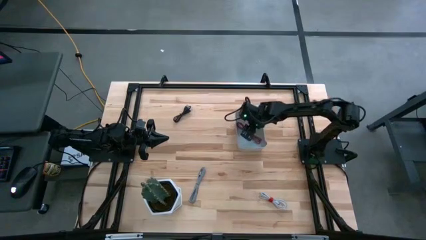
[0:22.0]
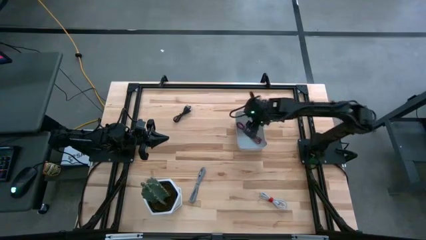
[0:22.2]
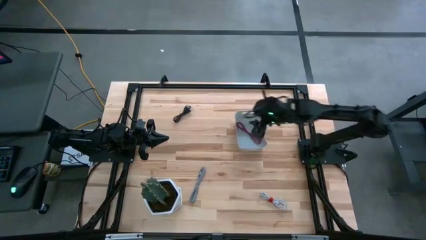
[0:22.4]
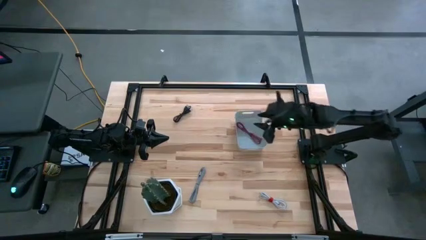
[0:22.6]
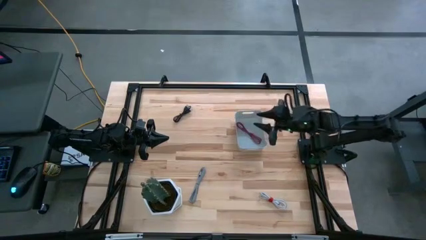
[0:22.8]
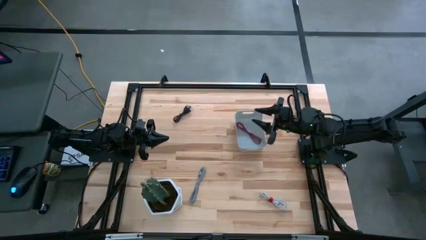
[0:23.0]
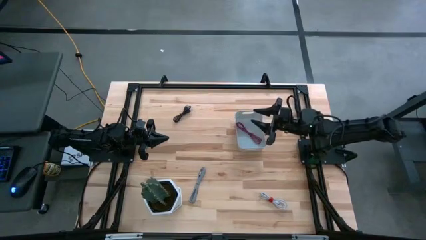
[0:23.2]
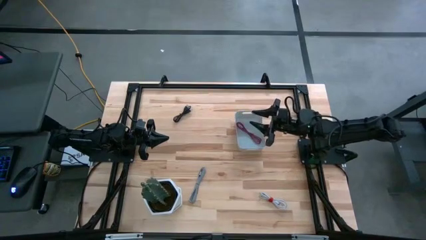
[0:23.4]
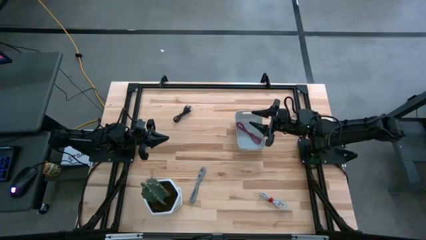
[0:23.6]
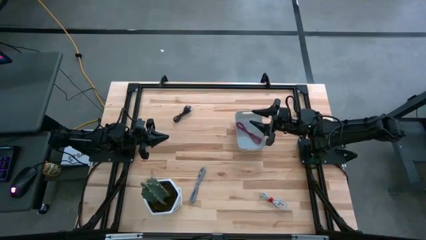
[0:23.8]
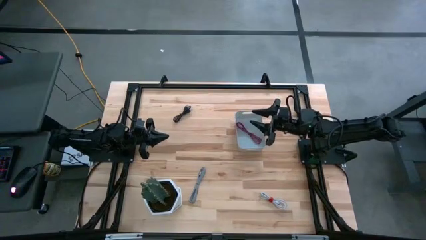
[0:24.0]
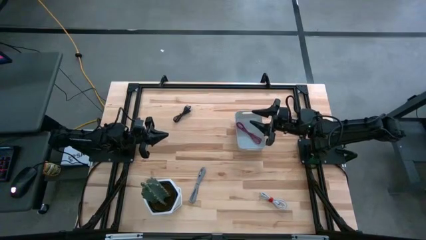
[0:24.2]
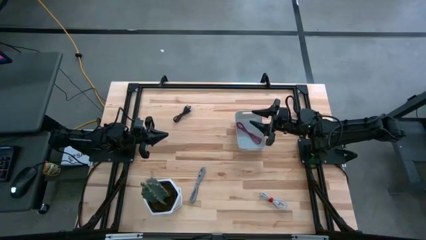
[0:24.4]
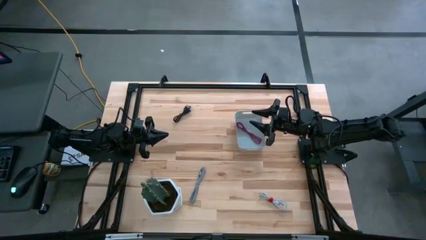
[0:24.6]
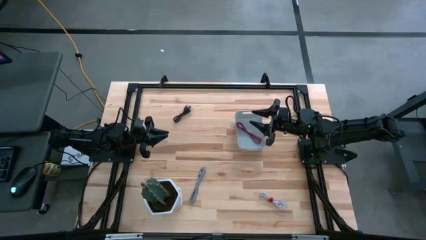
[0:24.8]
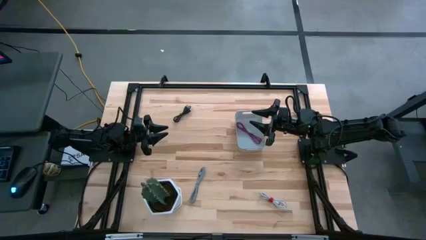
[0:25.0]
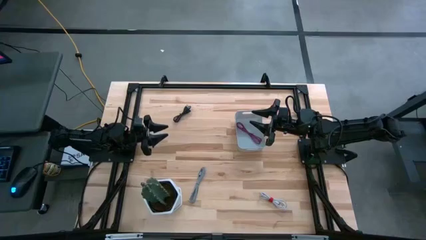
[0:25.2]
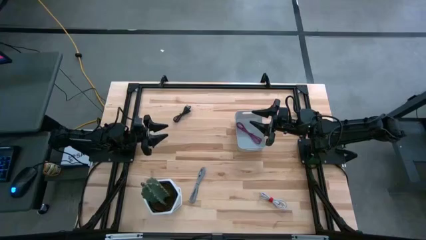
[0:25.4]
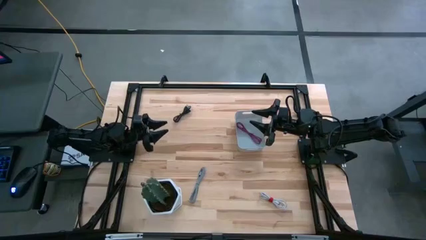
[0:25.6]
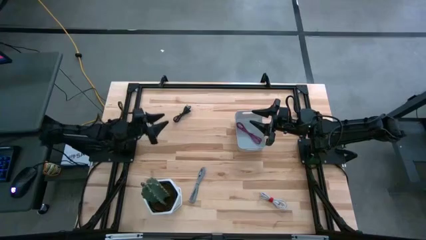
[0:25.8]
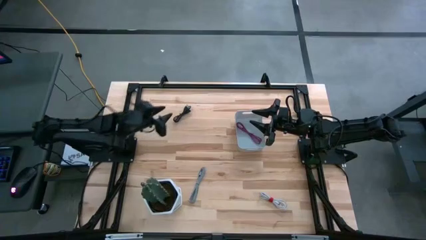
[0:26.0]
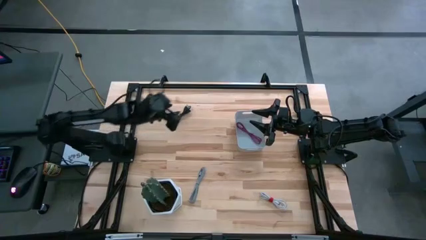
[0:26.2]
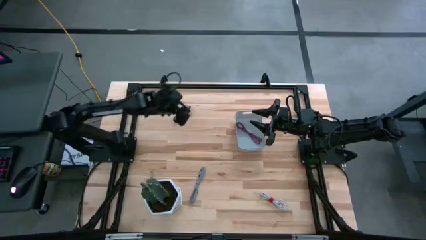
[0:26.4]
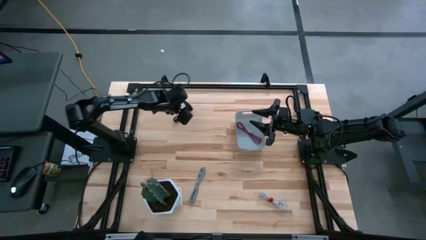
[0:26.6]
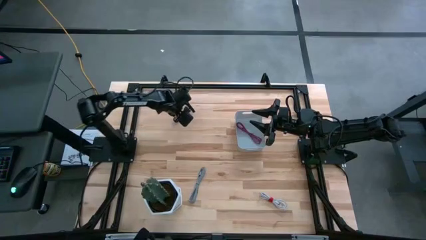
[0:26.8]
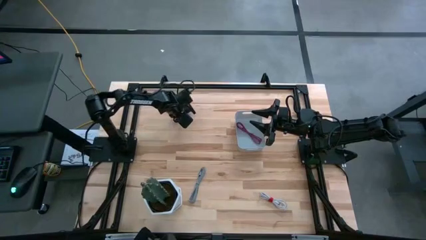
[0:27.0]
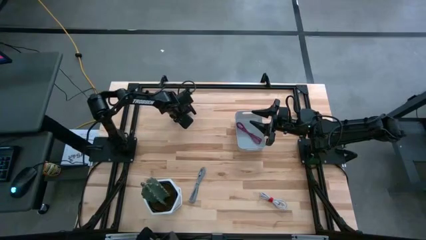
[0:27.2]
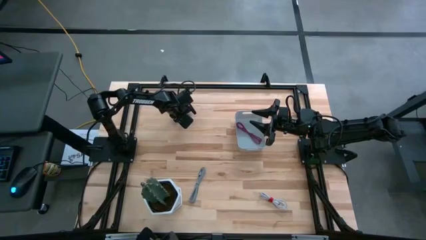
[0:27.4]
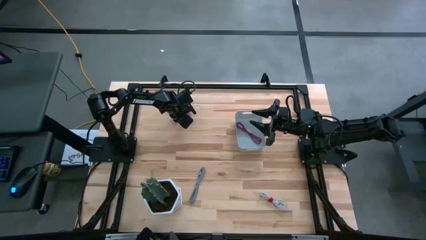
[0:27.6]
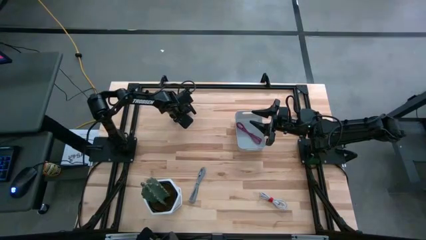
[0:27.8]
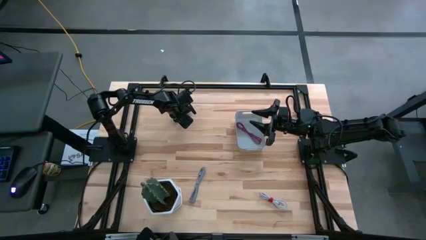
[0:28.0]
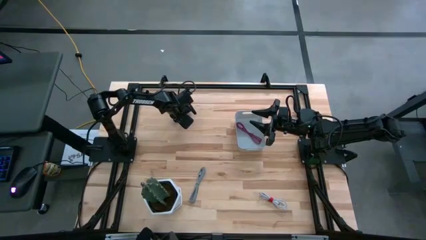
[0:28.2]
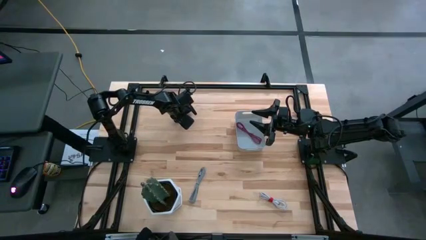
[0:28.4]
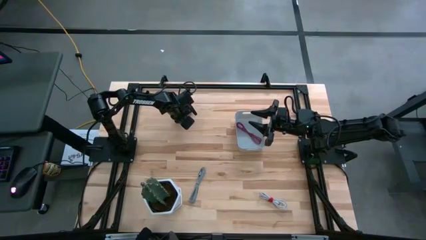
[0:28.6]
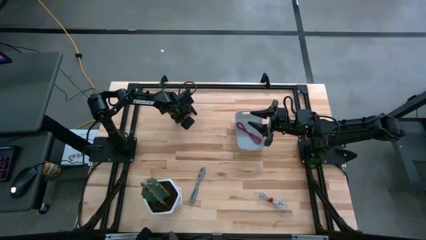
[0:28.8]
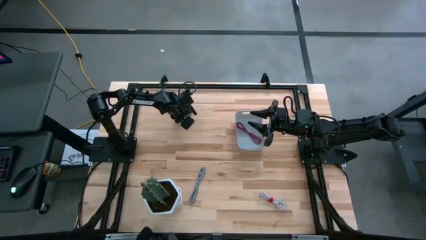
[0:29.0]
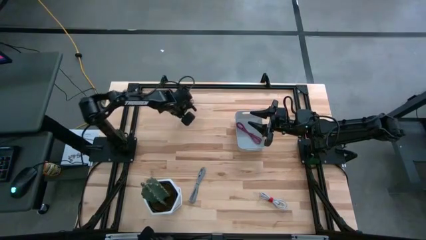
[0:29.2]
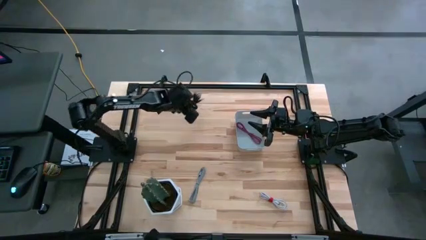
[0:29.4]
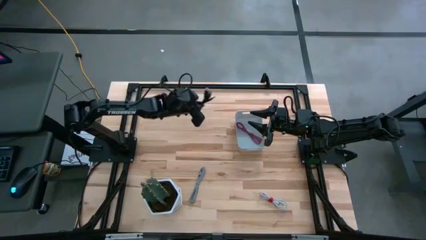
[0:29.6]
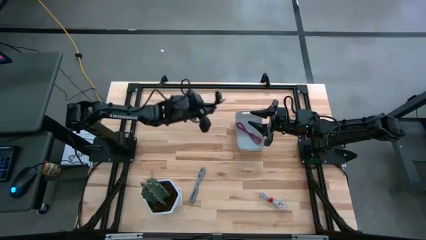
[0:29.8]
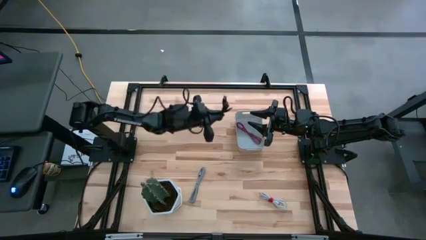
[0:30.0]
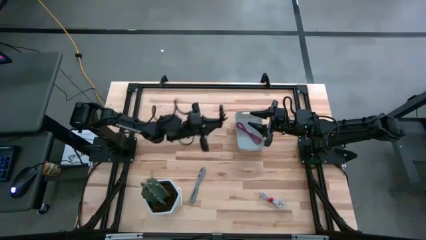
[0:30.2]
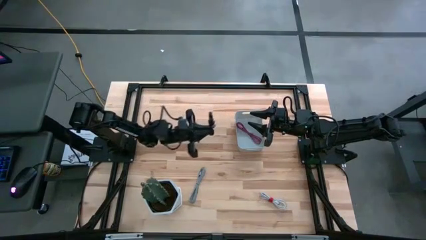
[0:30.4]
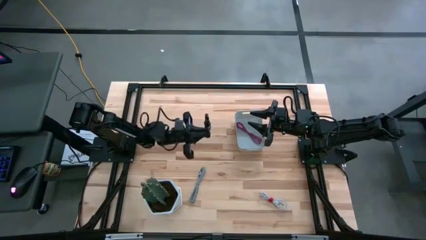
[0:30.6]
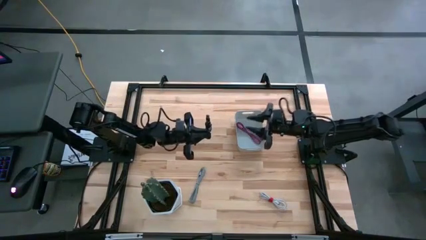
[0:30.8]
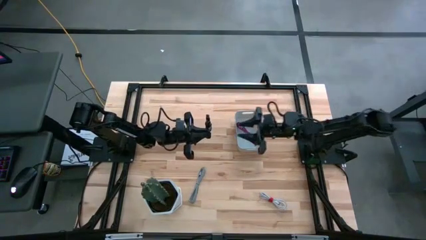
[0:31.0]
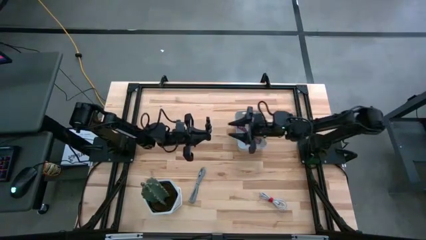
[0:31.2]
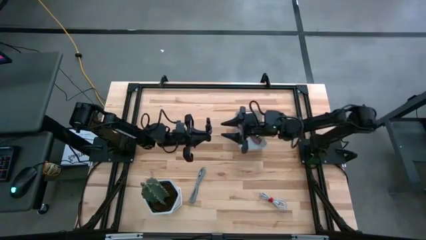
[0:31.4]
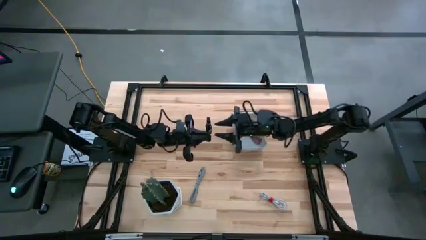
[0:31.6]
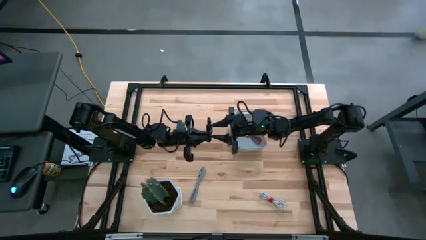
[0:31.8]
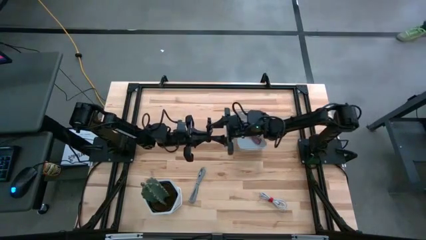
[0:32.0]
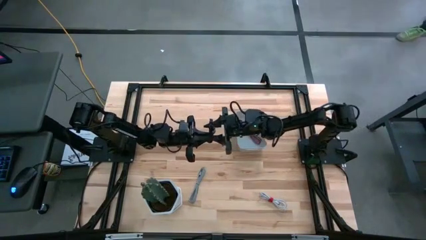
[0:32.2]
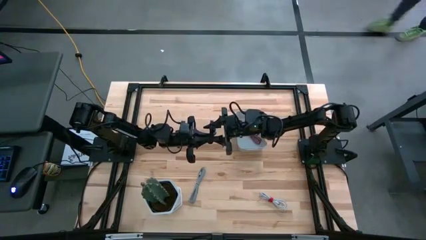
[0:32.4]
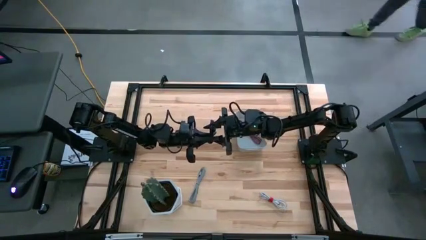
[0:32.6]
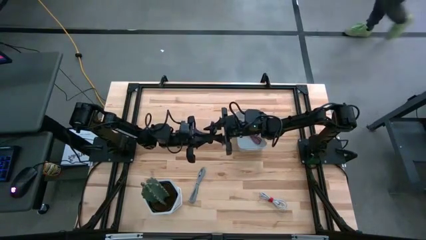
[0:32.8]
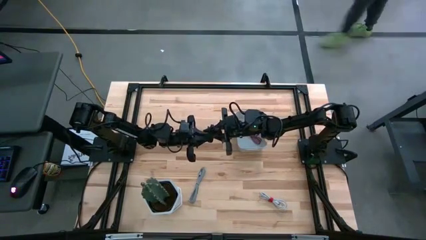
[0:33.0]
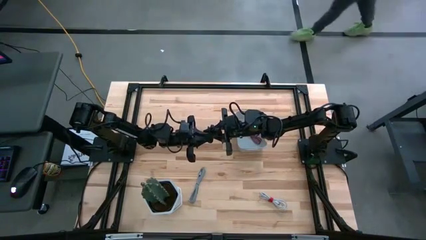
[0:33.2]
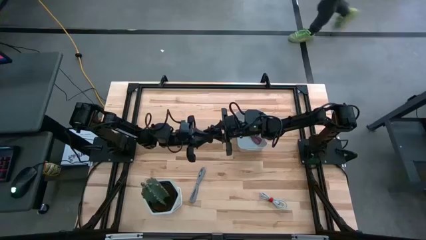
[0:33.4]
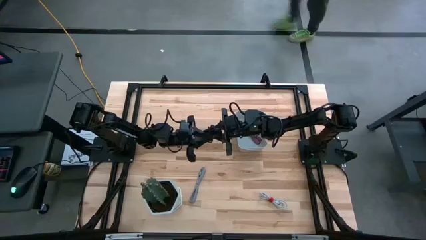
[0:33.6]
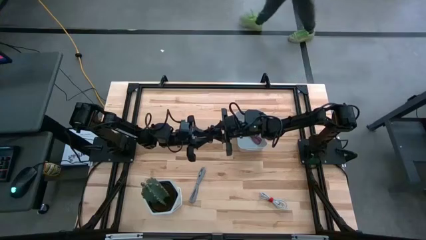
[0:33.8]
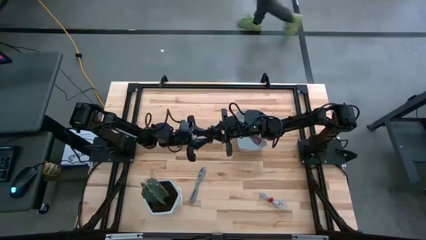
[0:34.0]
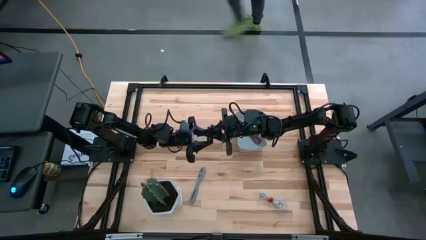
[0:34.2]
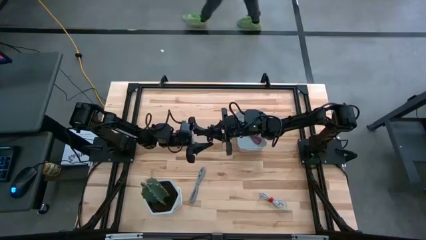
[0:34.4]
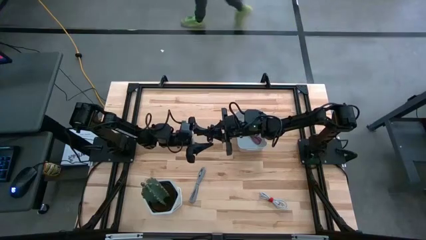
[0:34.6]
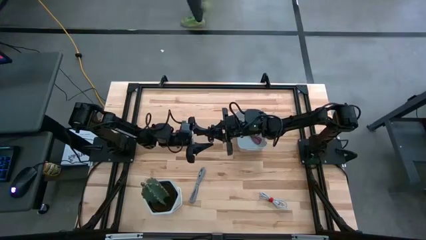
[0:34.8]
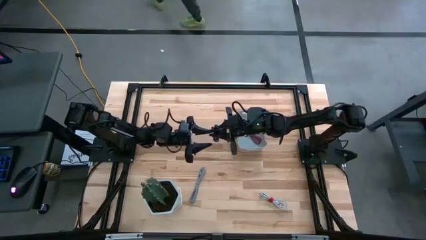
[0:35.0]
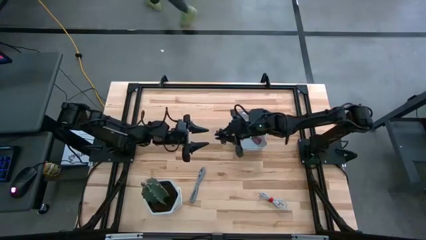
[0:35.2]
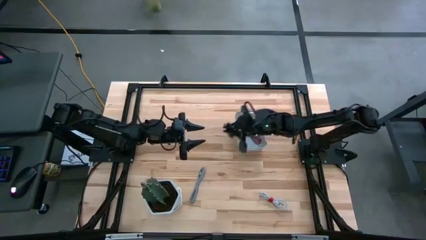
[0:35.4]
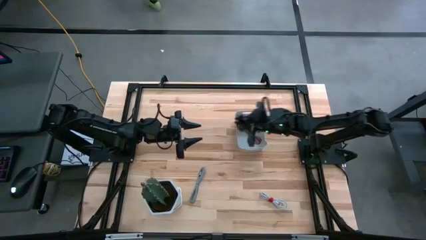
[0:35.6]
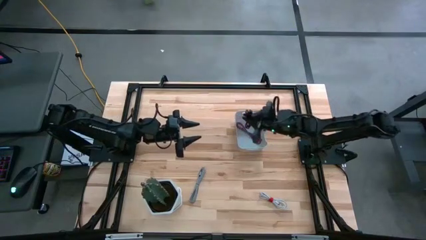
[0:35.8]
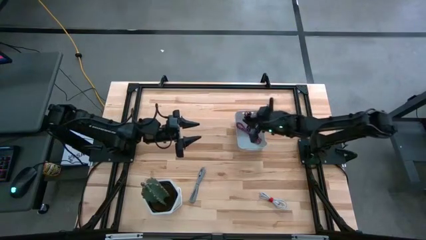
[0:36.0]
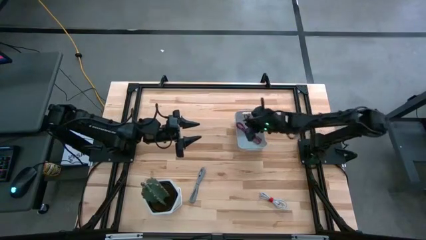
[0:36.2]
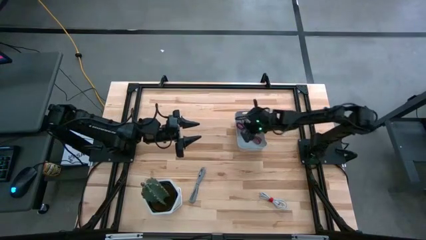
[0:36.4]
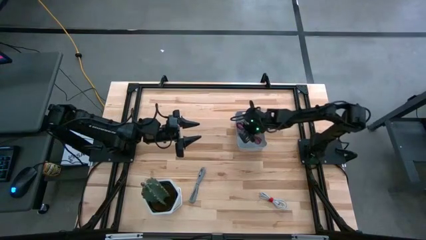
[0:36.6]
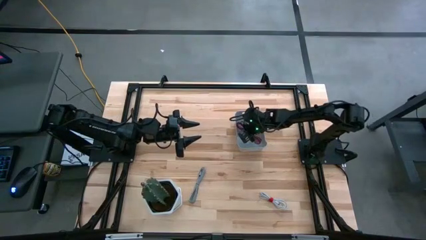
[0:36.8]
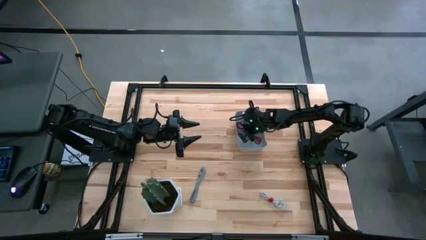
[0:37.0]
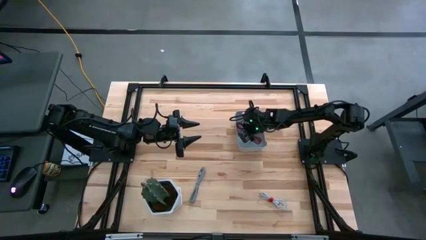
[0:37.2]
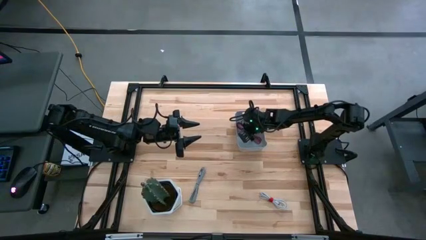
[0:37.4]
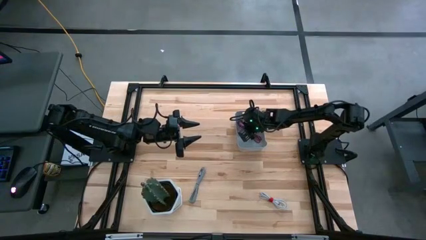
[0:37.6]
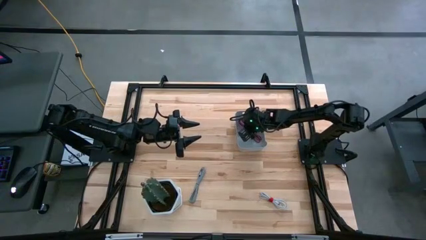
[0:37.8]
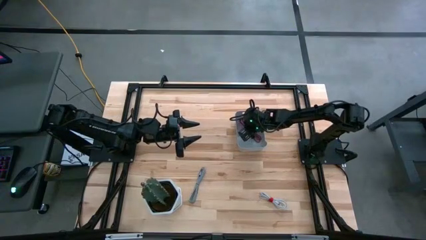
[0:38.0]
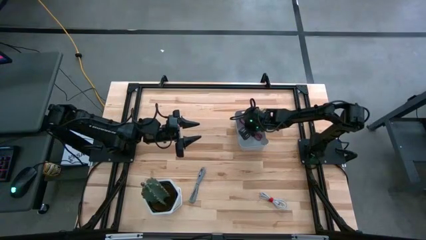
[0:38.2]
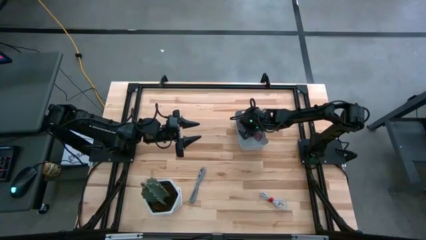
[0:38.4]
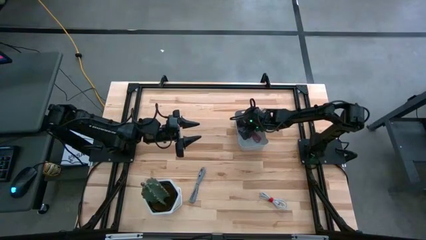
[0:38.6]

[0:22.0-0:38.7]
Task: Pick and place USB-C Cables
Put the black charger cable into the gray bin
